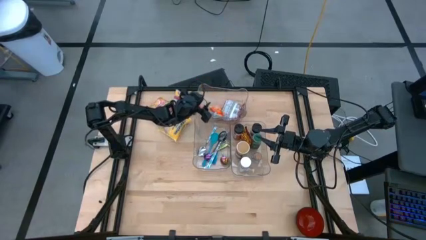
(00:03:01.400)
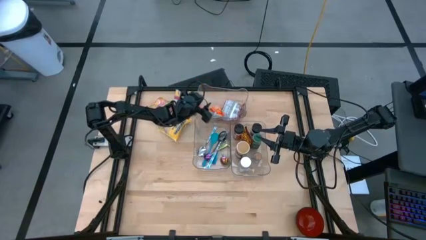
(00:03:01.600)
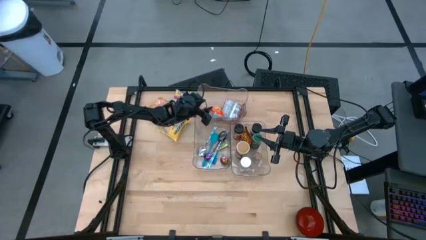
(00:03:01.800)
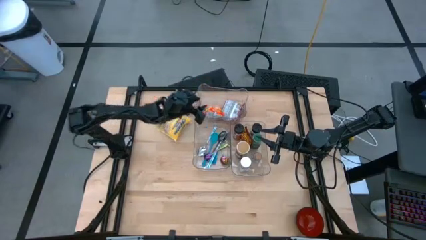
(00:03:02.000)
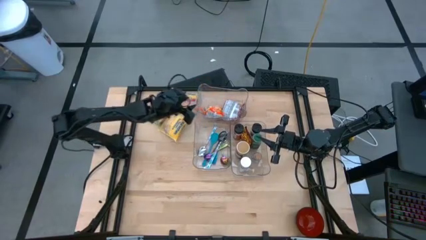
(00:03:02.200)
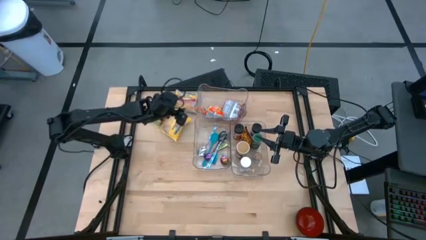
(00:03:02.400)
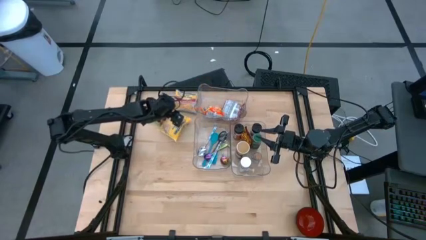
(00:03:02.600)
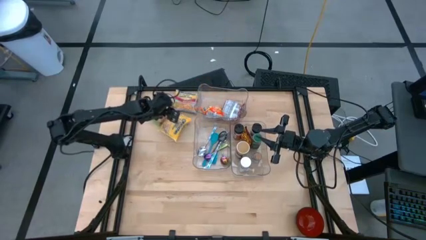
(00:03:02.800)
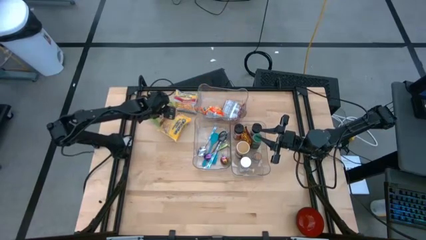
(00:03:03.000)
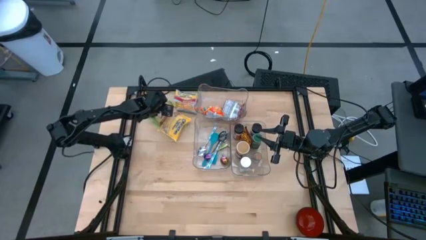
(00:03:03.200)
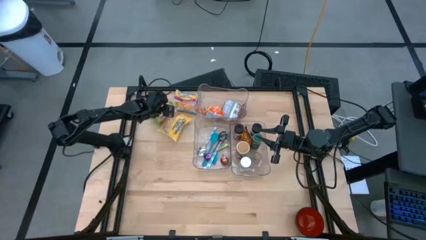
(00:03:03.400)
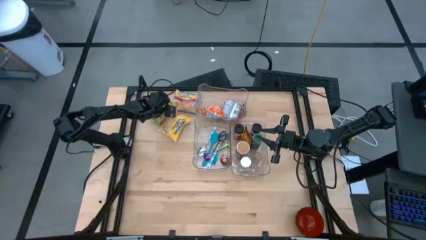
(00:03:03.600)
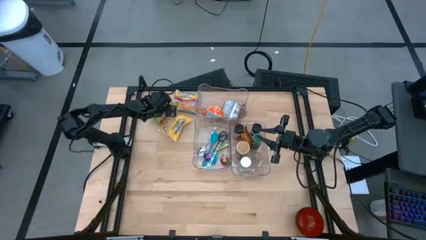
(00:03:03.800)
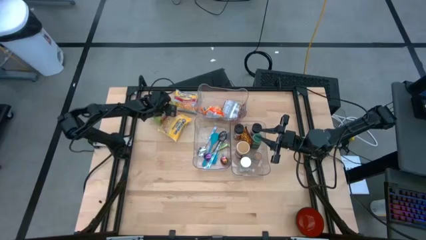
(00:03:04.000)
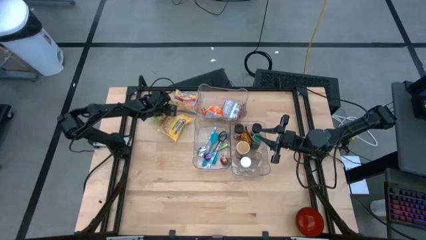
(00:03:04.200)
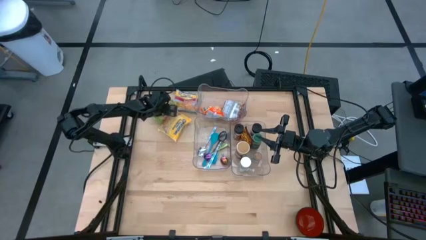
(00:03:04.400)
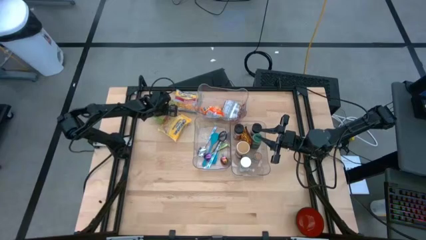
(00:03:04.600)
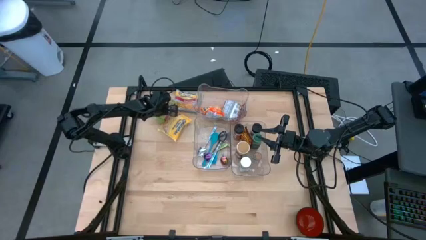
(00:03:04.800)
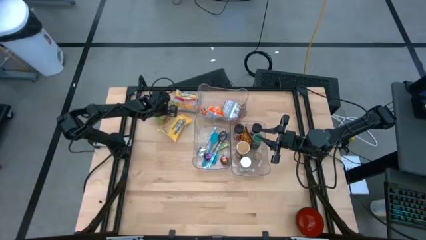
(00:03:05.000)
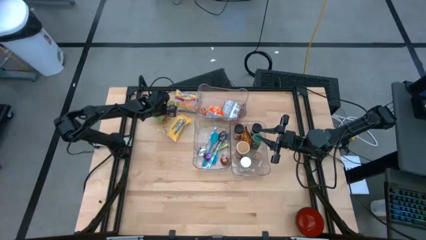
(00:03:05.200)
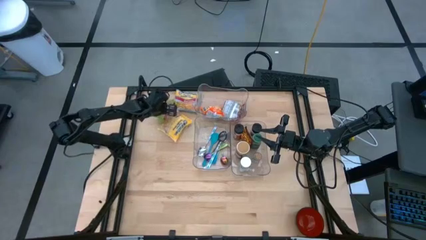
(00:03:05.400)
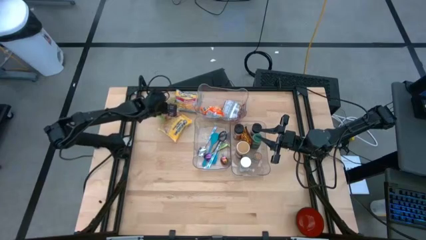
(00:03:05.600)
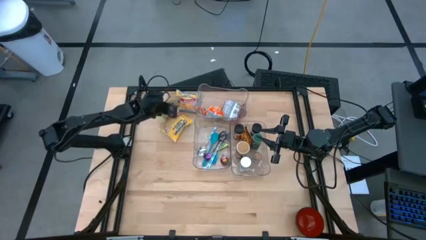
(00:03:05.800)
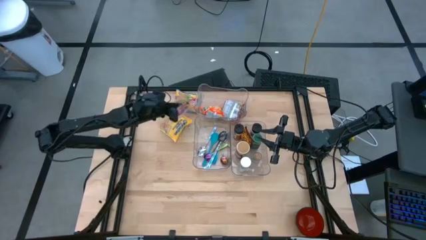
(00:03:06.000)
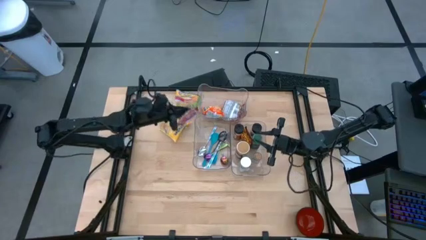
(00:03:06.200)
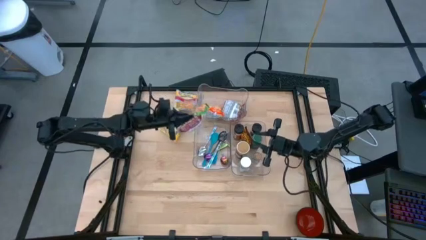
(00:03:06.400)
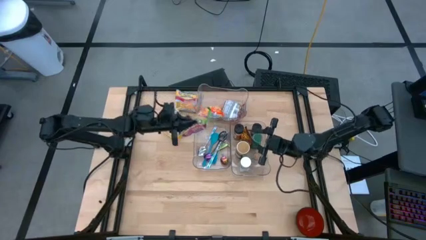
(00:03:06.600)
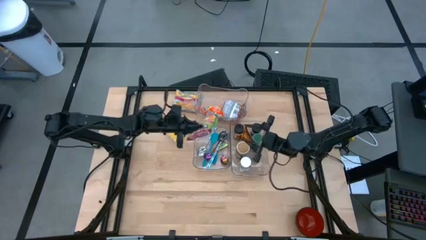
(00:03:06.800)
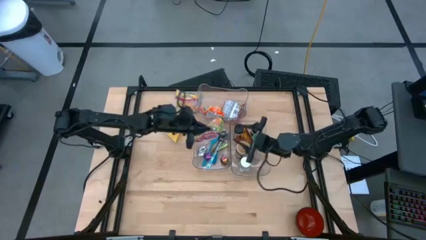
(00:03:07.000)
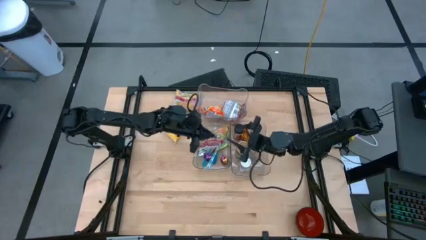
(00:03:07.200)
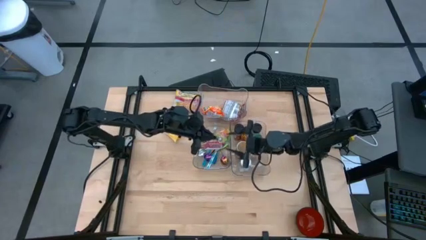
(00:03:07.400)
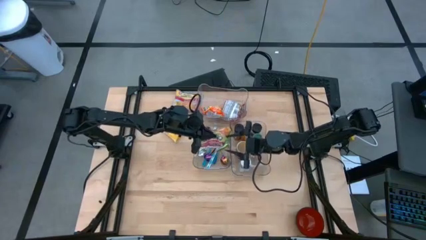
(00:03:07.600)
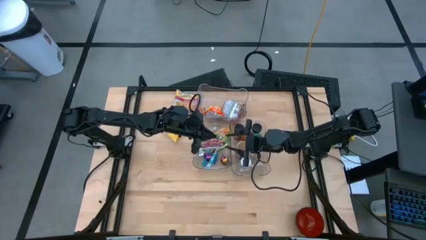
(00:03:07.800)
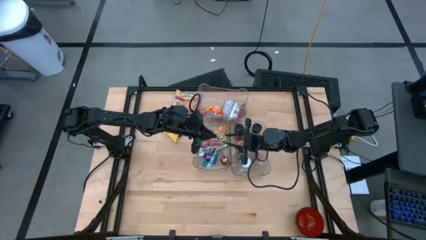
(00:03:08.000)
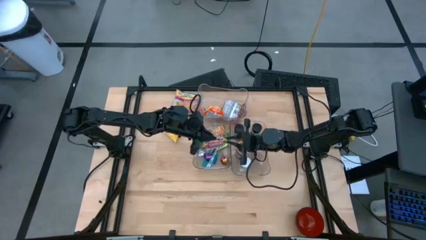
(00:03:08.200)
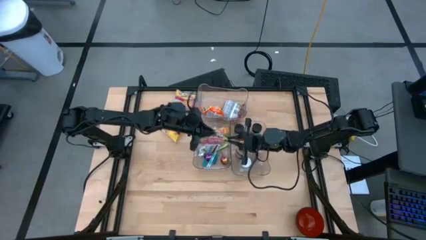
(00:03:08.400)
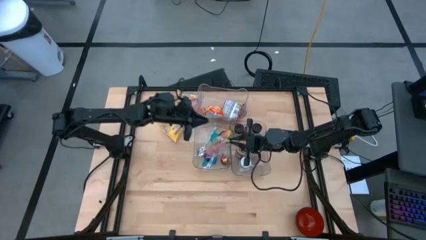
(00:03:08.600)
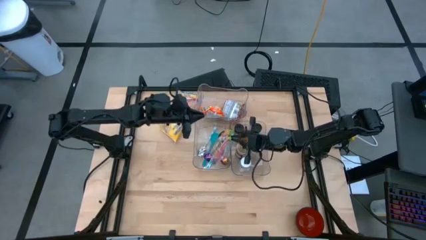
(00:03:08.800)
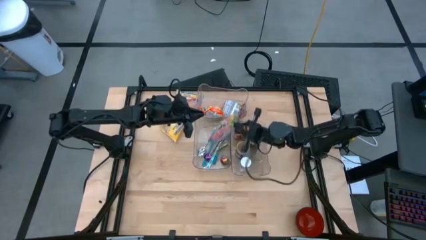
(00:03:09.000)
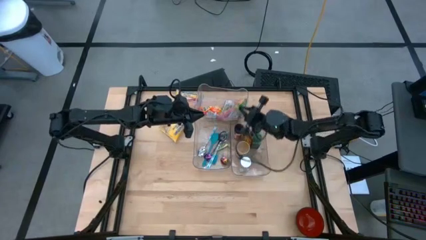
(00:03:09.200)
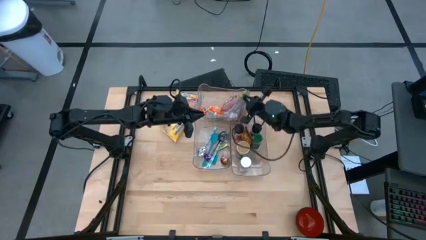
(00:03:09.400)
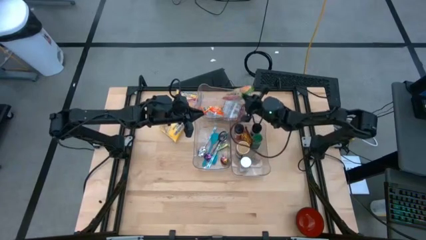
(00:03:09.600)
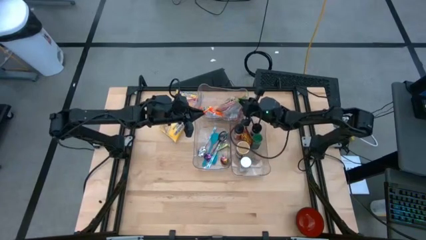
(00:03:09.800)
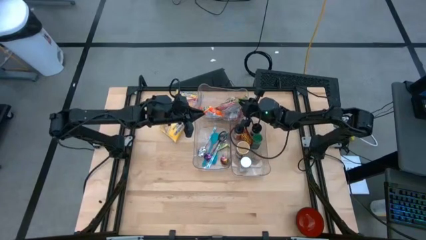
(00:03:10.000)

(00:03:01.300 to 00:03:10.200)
Task: Pick & Place Food Item
Put the green noodle pack into the top transparent bin

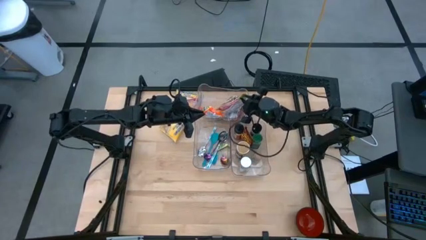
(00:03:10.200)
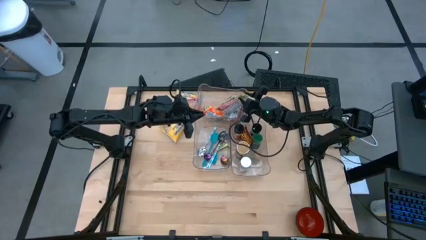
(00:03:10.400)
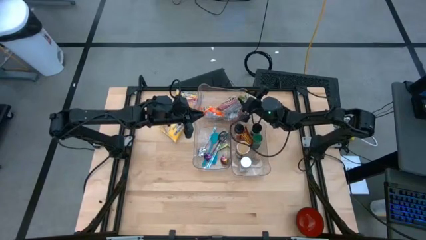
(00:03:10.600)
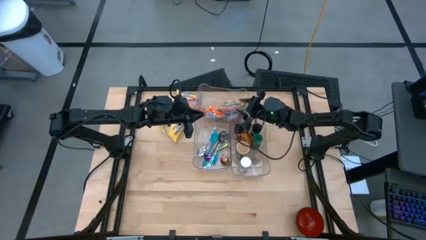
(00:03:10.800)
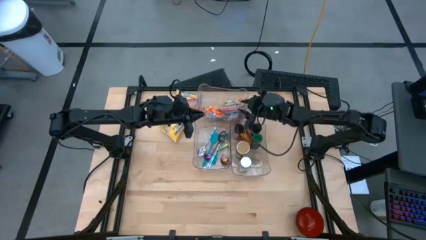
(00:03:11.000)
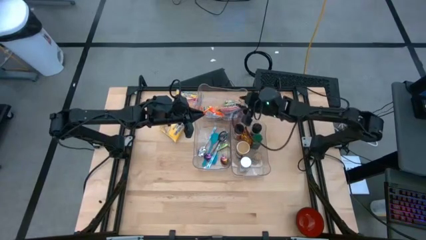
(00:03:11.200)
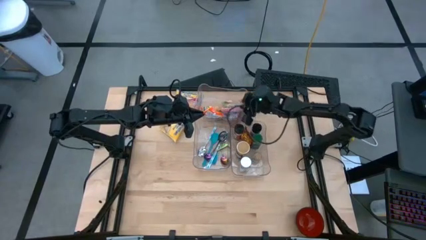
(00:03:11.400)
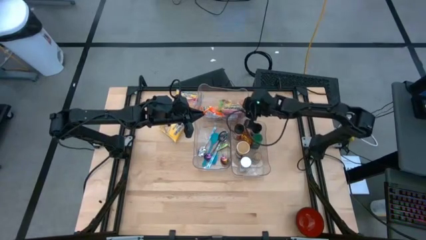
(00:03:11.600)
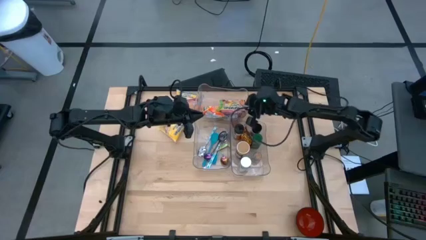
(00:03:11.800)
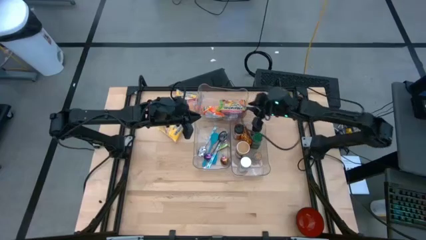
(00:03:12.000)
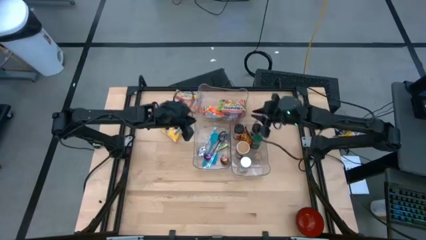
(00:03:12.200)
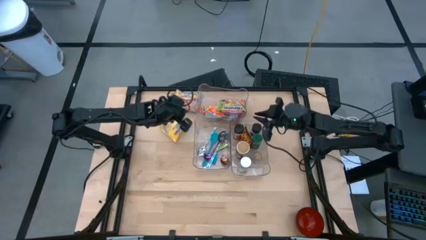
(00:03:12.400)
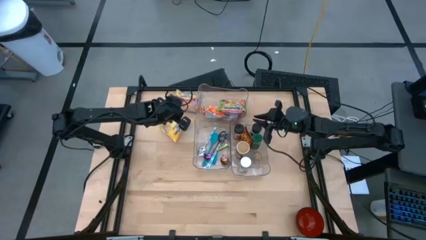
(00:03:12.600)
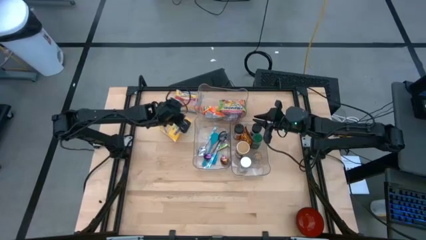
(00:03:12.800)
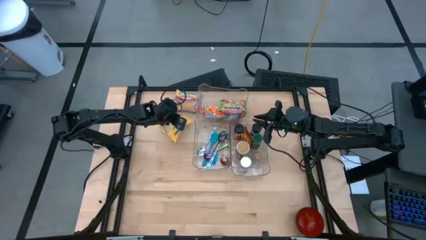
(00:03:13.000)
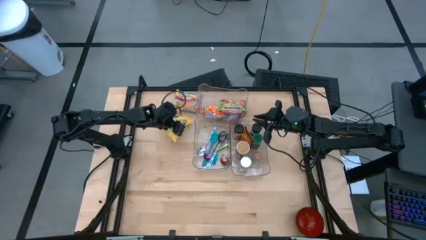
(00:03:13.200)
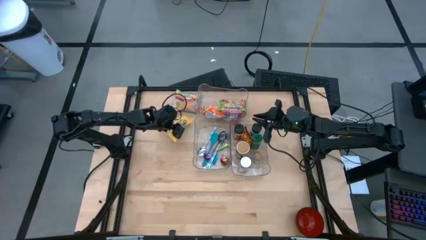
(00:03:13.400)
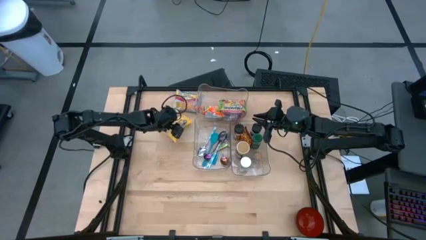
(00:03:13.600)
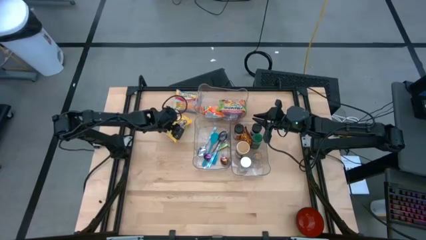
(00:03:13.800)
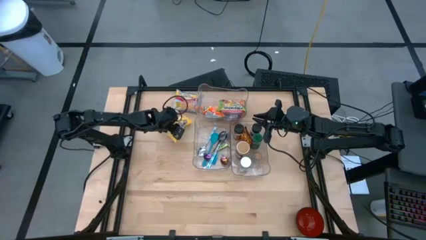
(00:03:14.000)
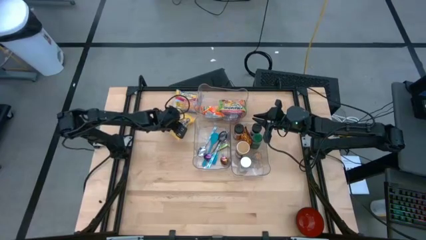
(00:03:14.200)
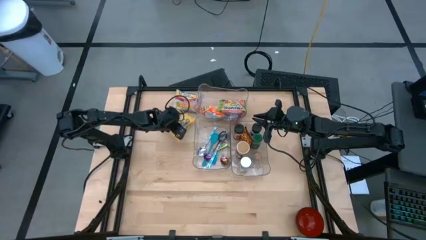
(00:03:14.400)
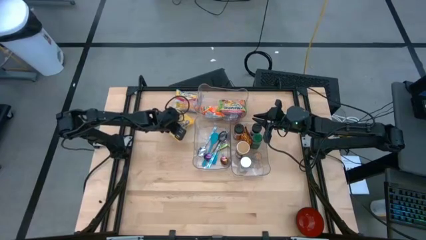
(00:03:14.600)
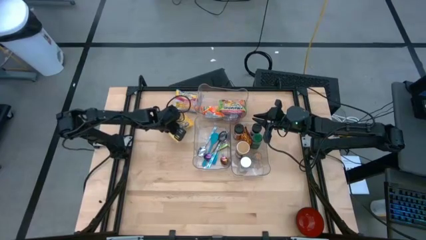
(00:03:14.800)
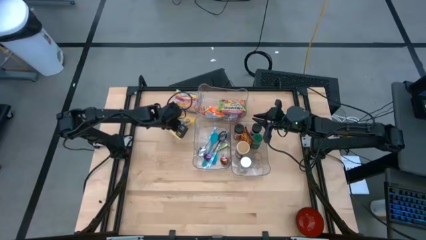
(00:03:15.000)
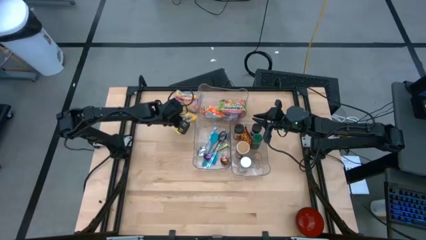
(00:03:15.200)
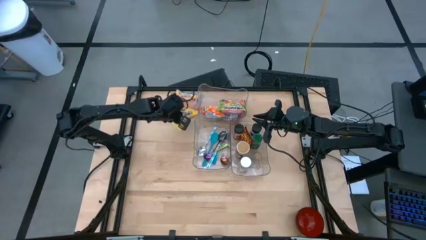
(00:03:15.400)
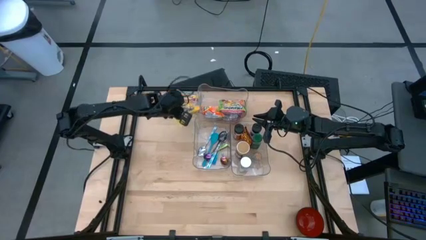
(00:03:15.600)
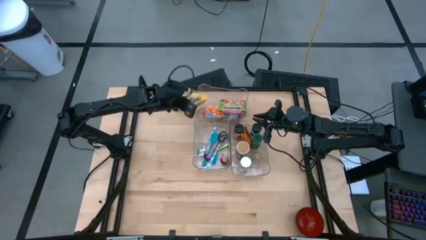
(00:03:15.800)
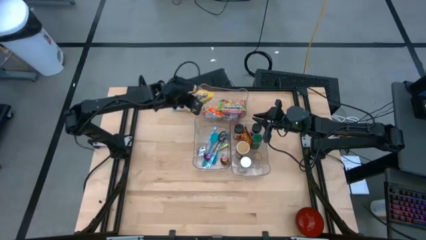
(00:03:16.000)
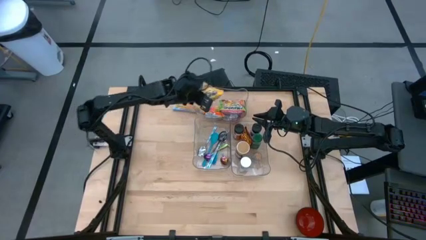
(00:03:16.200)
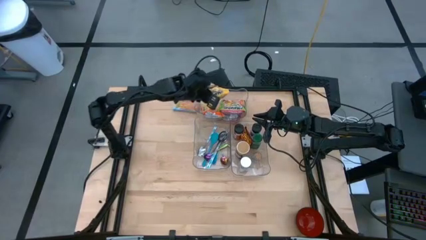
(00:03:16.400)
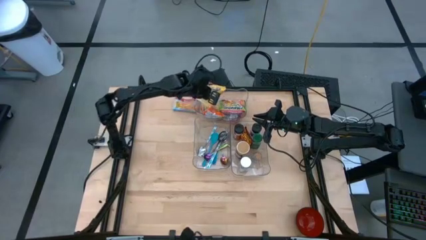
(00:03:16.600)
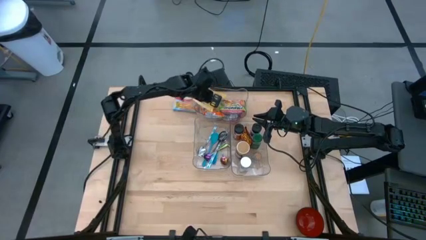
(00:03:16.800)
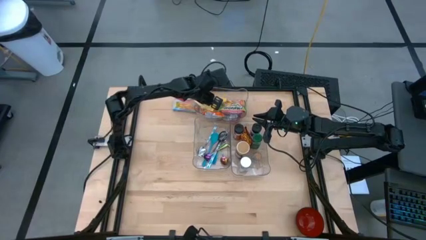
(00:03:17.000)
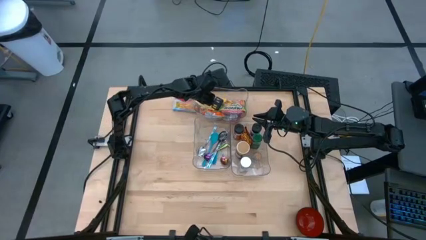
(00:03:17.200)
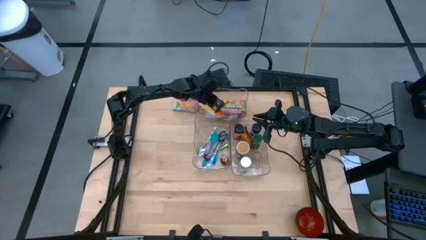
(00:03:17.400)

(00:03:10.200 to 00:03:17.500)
Put the yellow noodle pack into the top transparent bin

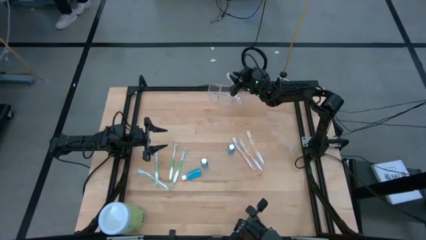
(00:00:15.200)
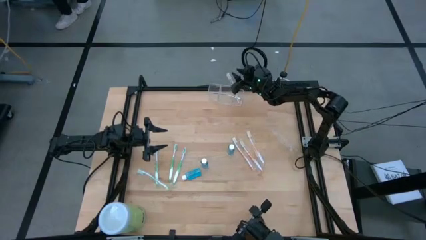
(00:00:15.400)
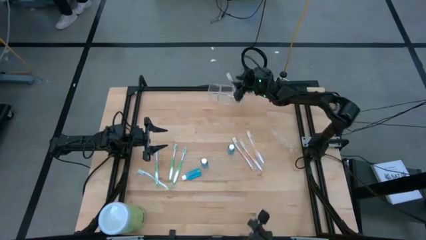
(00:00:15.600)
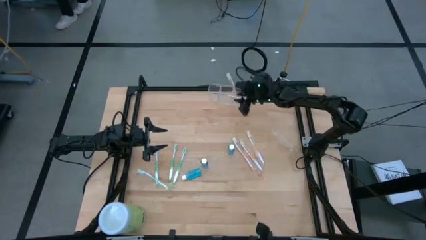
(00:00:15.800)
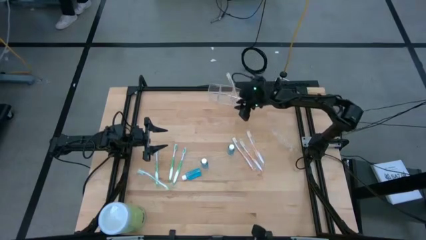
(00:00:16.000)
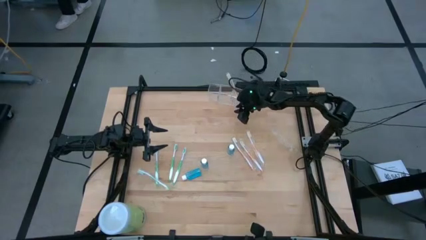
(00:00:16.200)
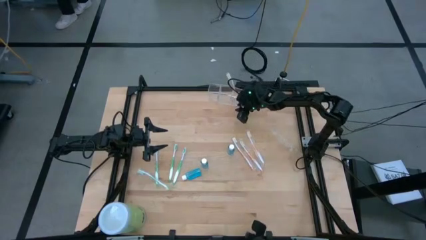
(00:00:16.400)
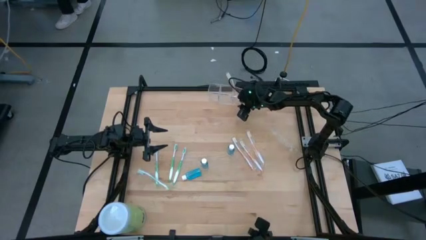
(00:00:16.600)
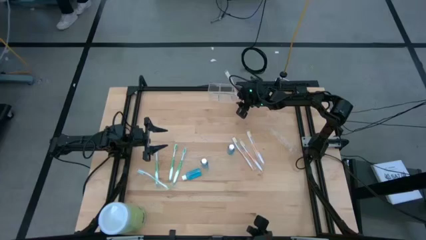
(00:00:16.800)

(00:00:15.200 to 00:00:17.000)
Task: Pick & Place toothbrushing station
Adjust the transparent organizer
